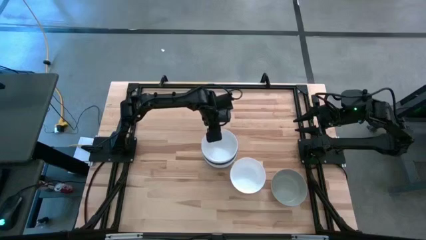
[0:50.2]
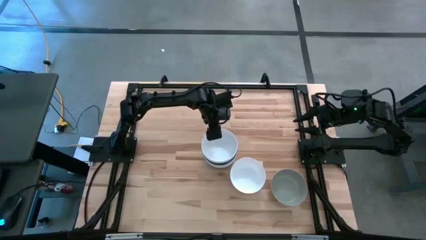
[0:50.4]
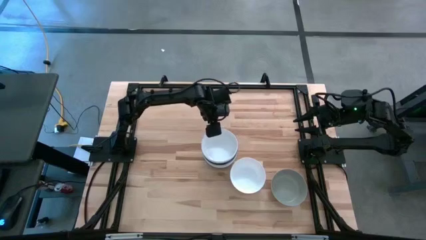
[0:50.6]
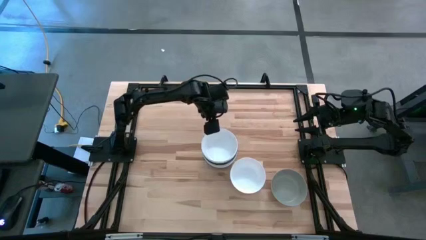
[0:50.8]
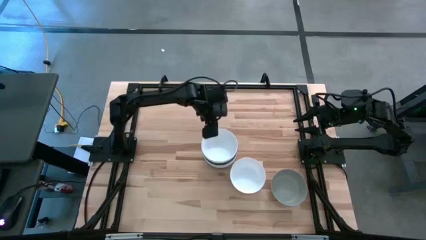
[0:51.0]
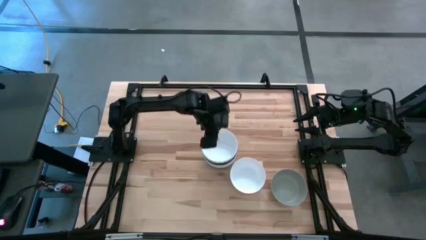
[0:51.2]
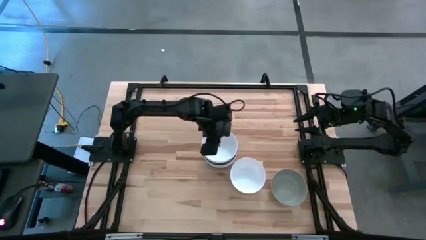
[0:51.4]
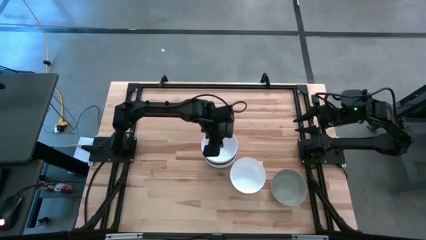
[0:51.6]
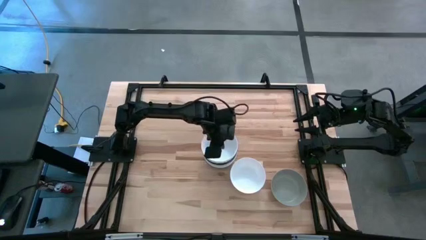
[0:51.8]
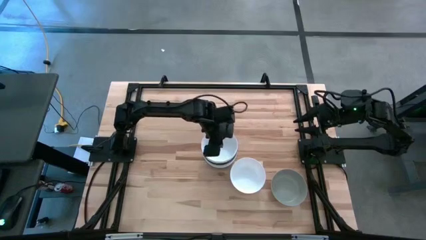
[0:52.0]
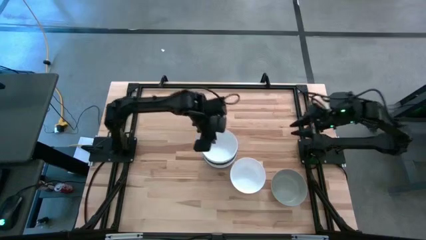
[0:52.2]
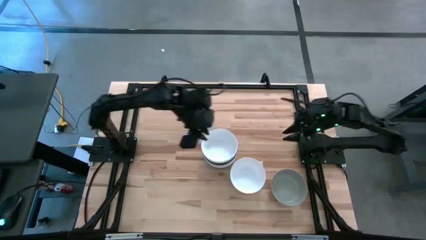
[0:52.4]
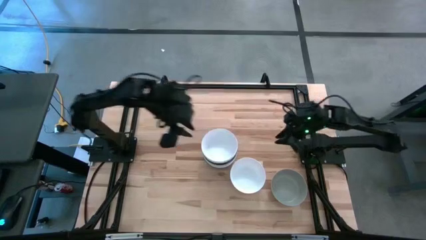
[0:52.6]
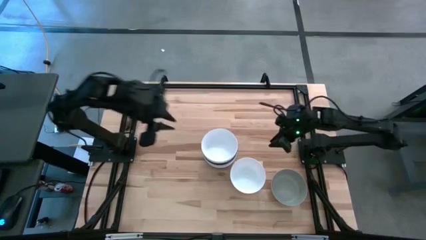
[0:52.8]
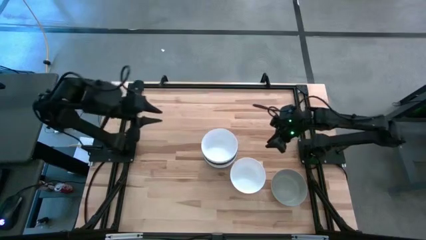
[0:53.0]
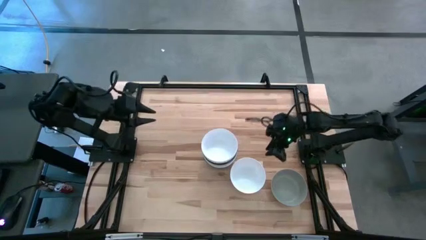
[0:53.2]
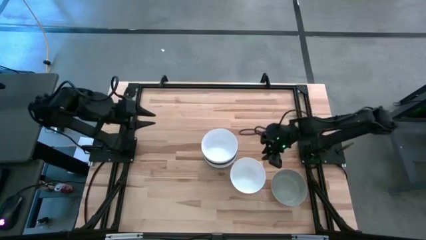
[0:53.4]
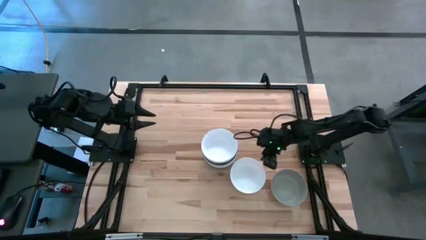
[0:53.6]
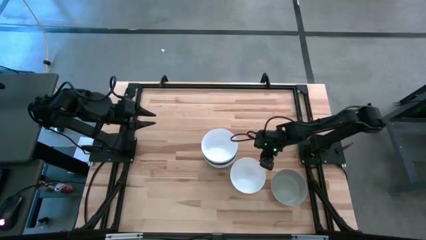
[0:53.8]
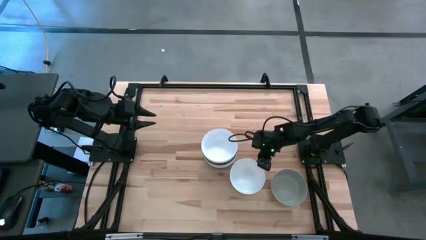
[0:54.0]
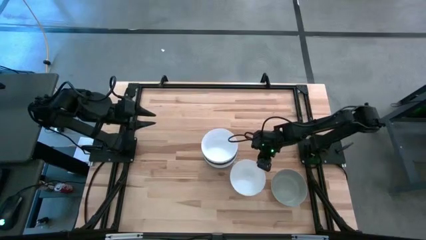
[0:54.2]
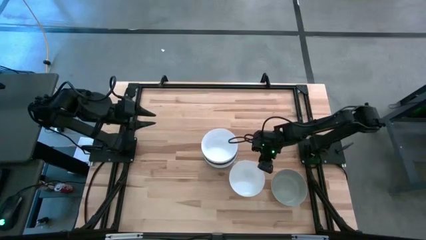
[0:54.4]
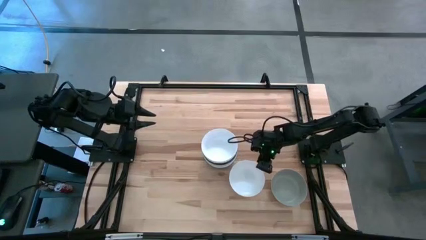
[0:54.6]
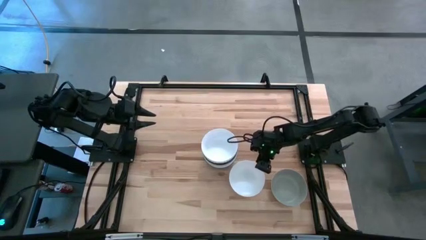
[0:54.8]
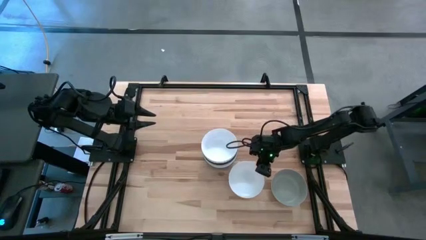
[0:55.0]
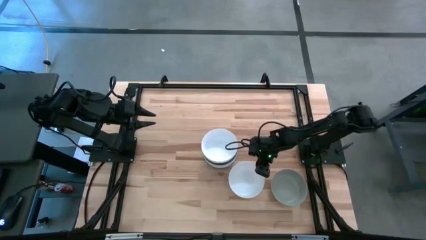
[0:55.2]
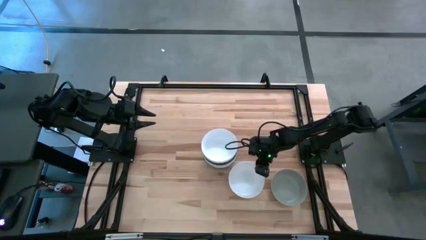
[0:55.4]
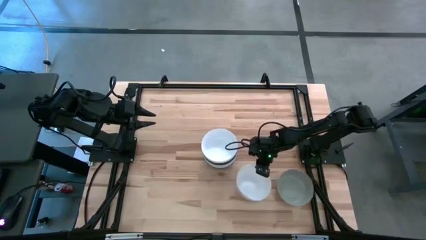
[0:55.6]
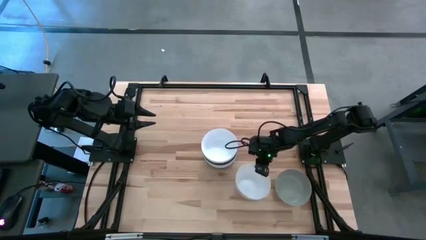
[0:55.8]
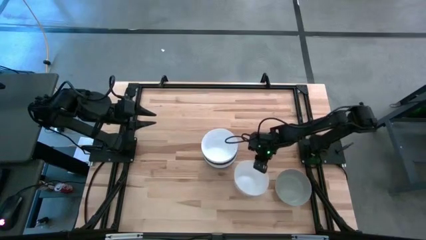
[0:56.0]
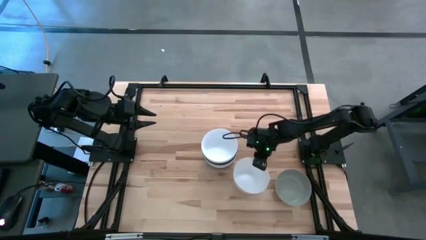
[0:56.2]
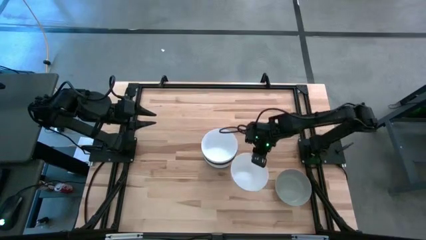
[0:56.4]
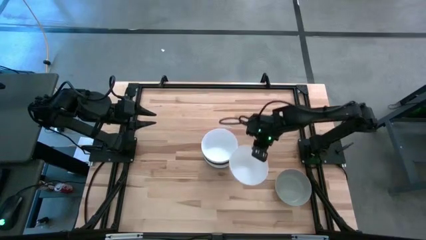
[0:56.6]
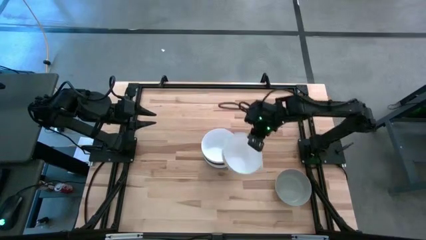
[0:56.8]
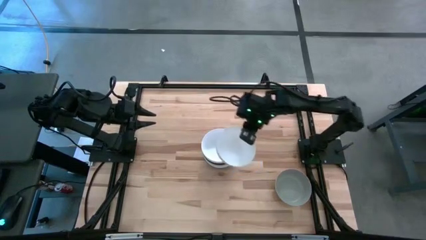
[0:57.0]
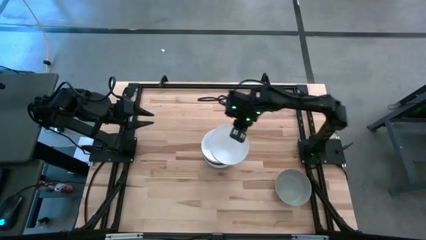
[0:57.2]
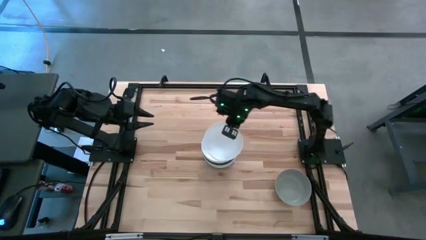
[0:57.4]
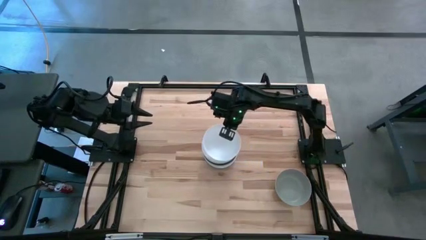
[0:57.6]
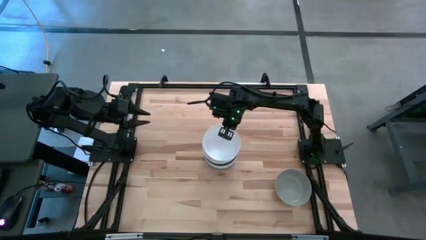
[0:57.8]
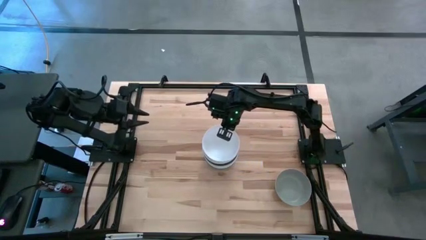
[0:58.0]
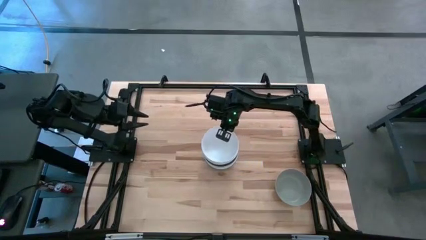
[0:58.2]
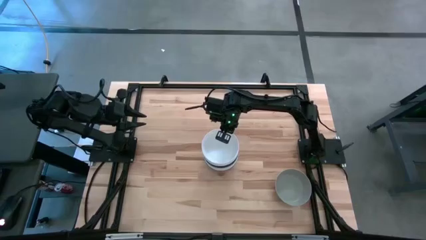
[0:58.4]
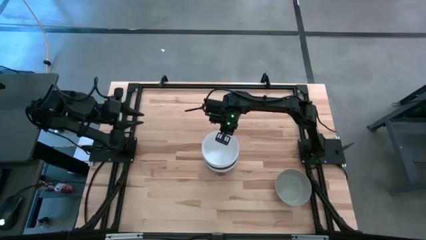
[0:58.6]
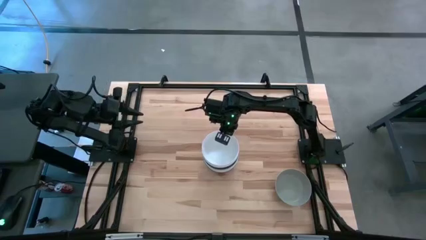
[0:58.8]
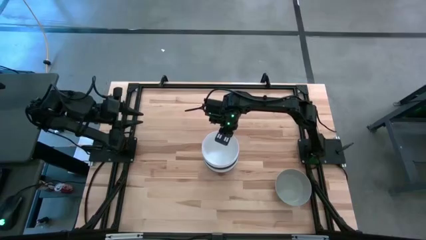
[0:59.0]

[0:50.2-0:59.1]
Task: Nest bowls inside each other
Stack the white bowl on top of the white bowl

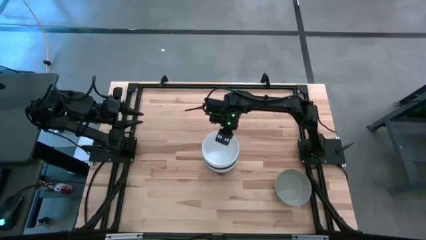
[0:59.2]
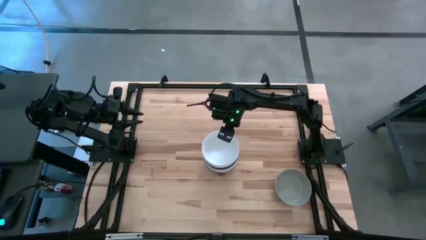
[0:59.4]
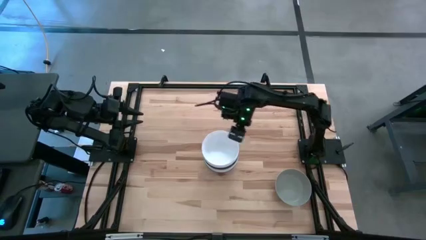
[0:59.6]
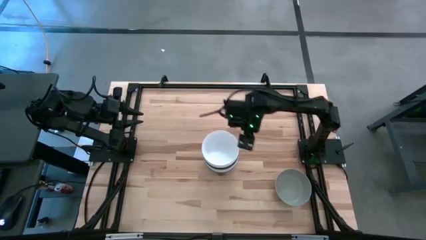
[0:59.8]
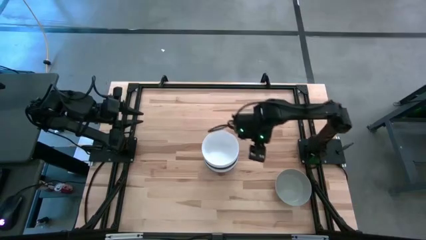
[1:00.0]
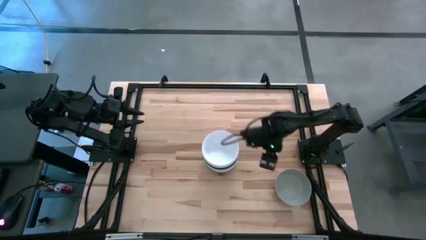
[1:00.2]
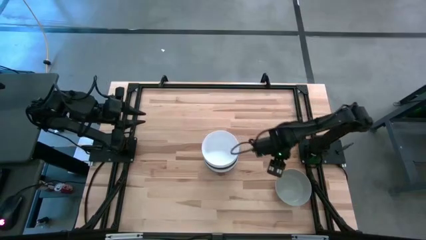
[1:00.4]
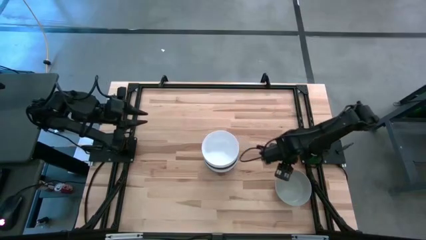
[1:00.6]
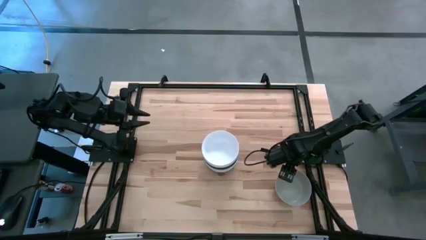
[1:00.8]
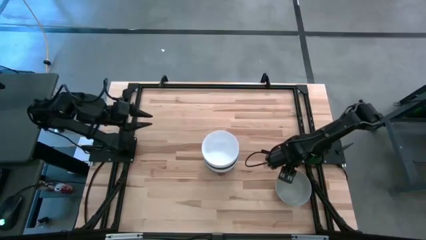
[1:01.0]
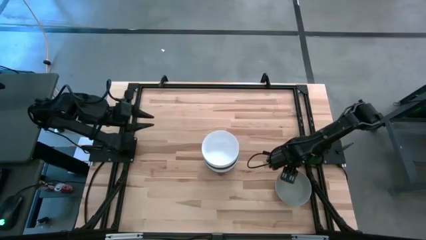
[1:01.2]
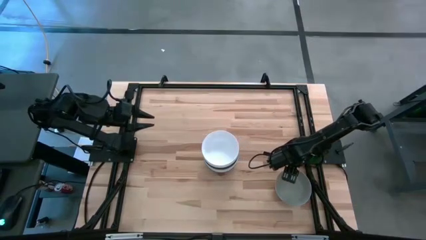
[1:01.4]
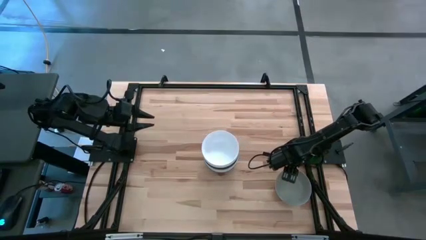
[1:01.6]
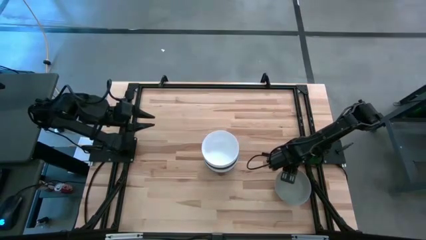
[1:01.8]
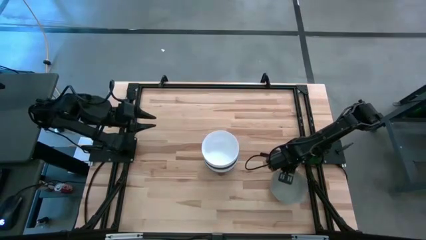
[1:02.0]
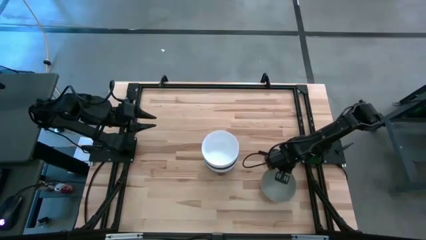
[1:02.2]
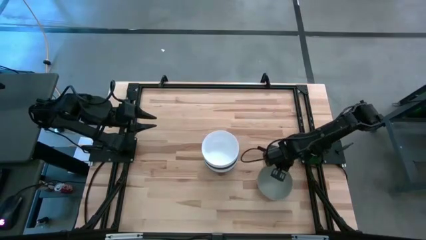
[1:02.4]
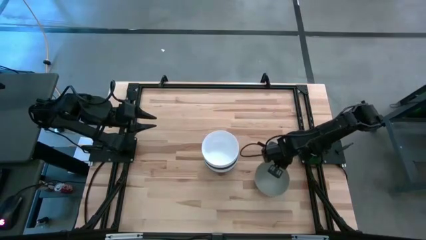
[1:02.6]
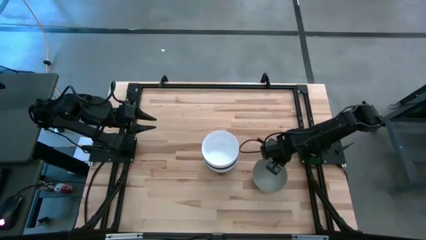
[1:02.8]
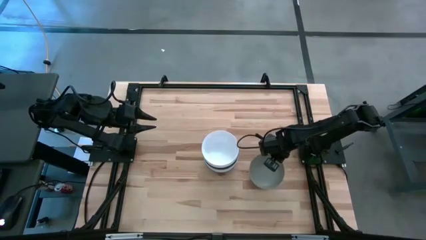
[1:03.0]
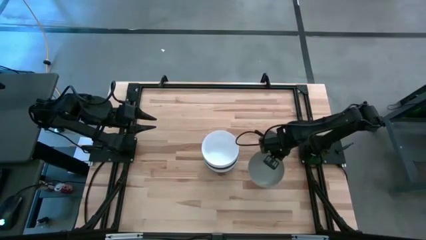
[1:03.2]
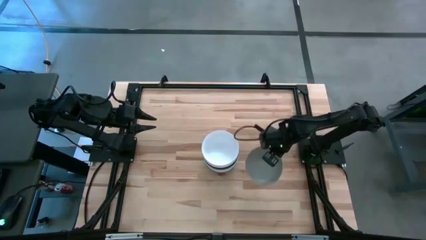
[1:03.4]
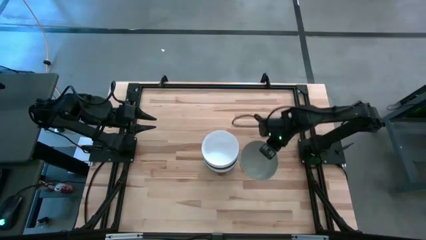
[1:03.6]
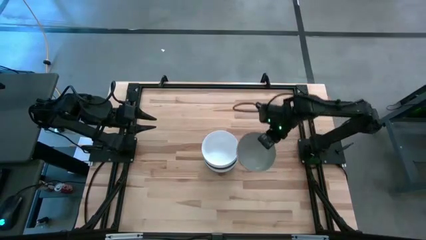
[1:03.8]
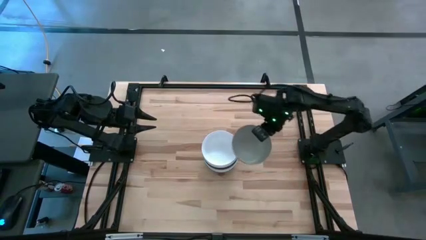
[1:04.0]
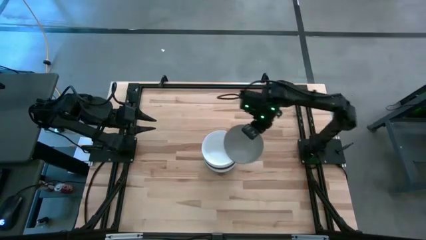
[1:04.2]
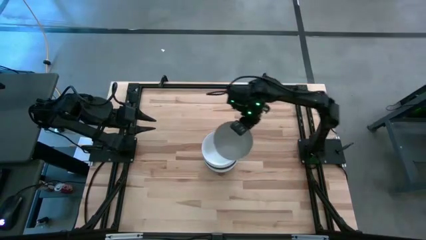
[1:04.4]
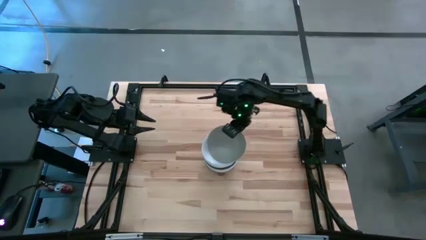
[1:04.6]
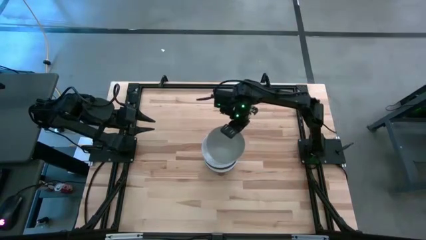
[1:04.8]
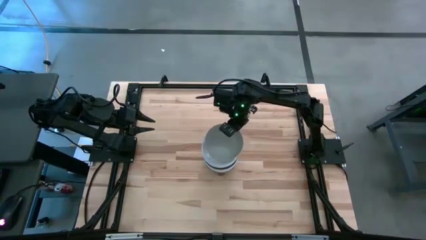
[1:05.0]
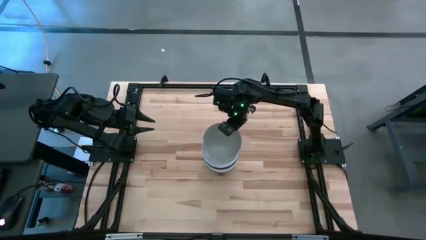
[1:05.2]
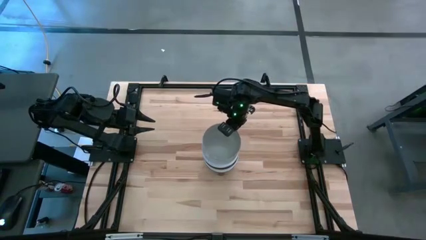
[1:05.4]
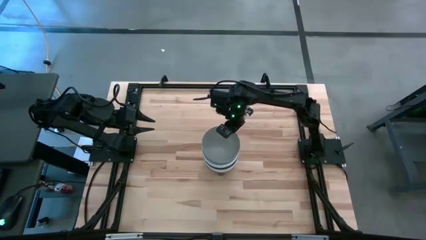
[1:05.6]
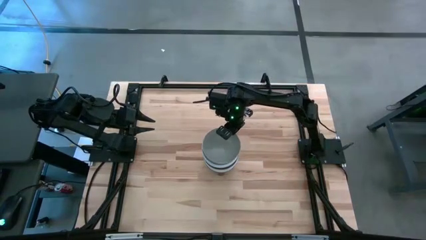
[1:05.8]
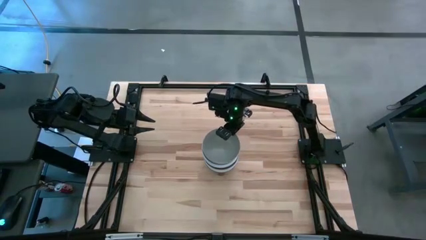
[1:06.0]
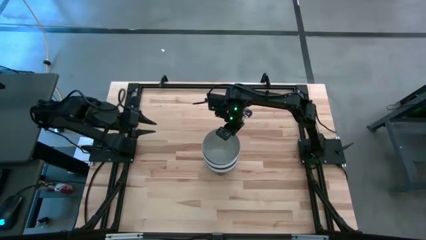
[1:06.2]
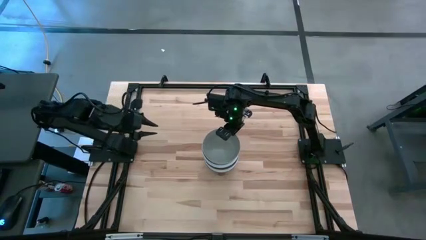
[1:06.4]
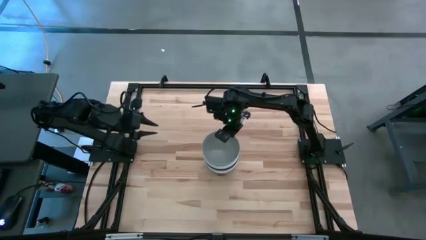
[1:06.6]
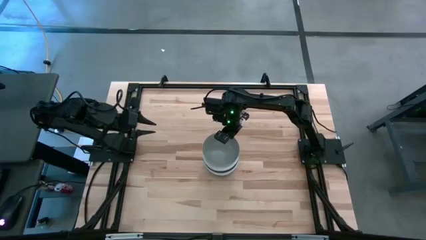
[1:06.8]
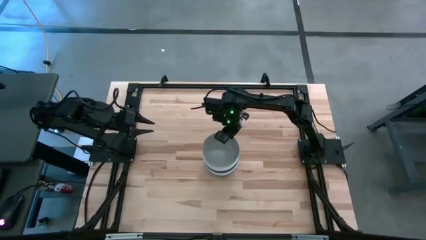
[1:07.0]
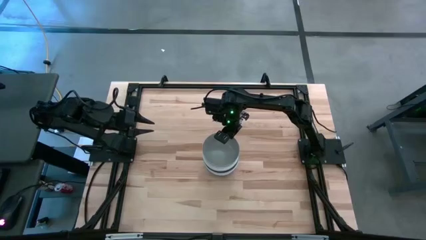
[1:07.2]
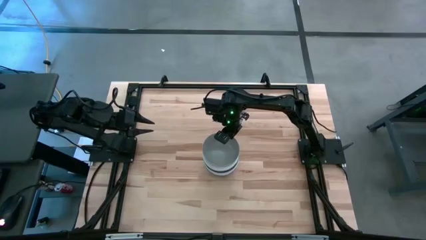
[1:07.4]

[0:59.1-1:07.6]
Stack the light gray bowl on top of the white bowl
